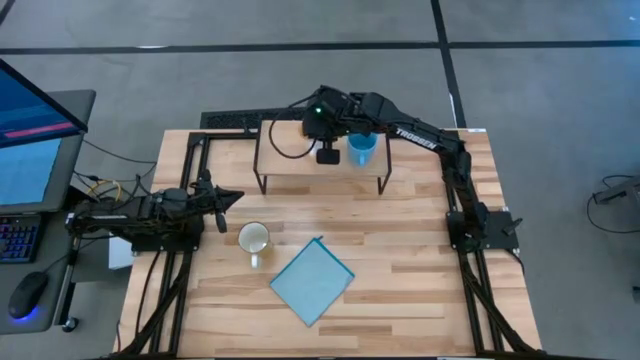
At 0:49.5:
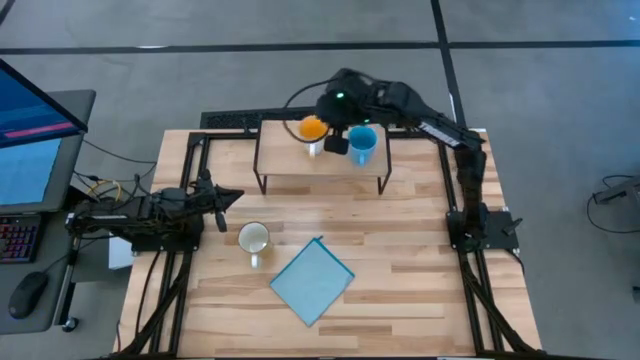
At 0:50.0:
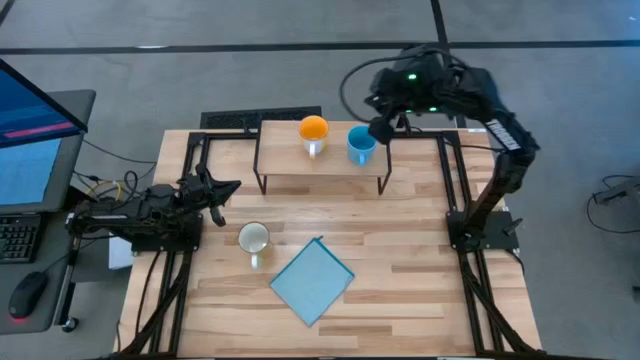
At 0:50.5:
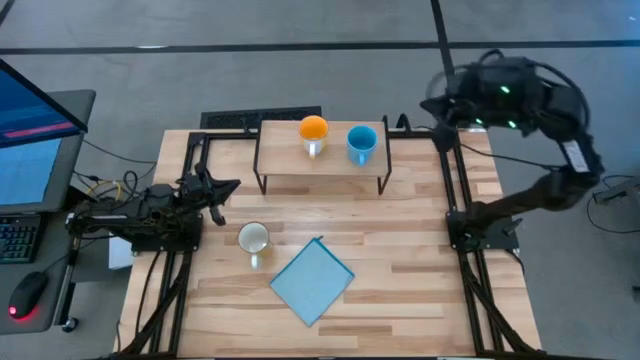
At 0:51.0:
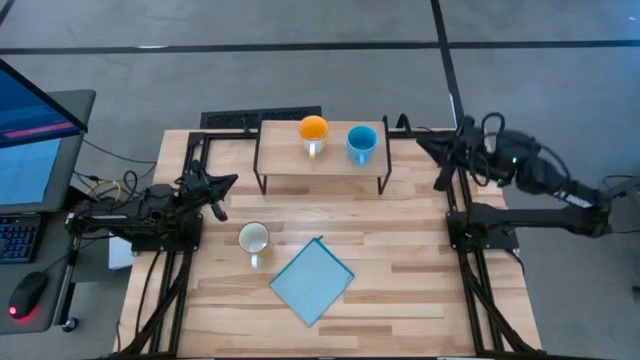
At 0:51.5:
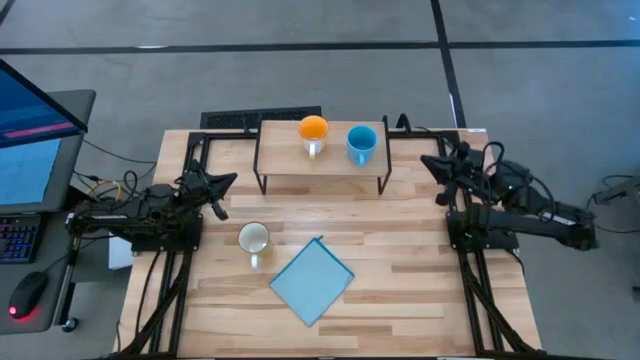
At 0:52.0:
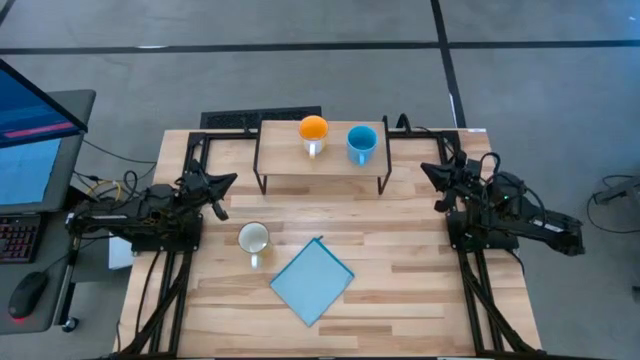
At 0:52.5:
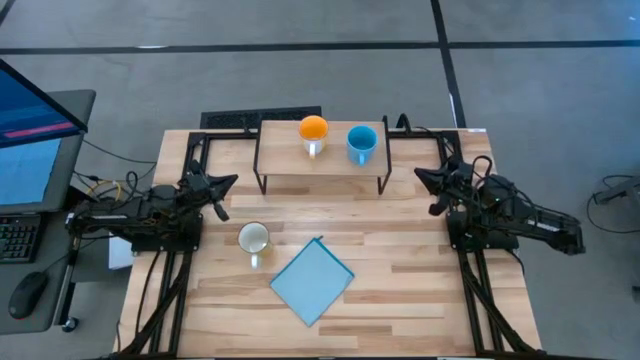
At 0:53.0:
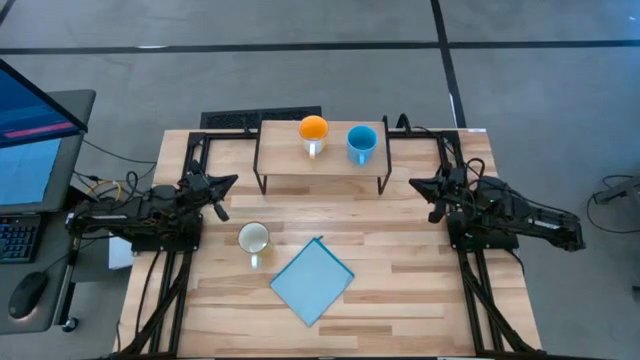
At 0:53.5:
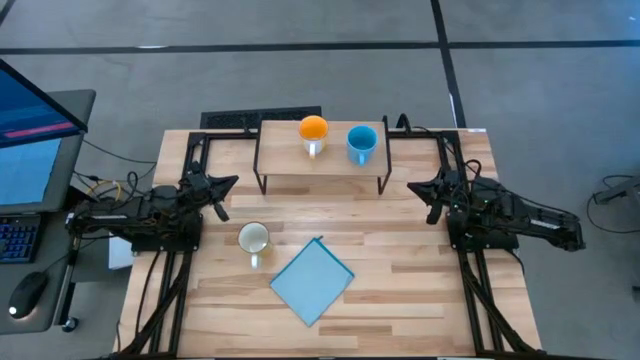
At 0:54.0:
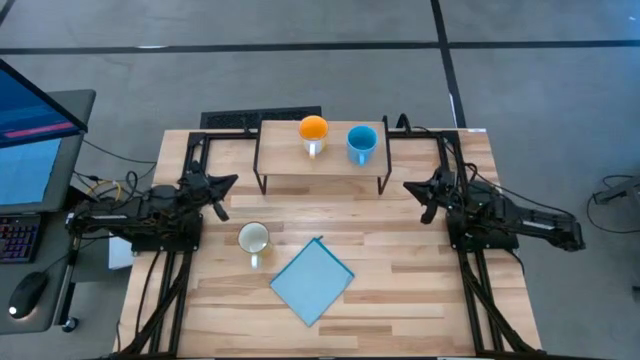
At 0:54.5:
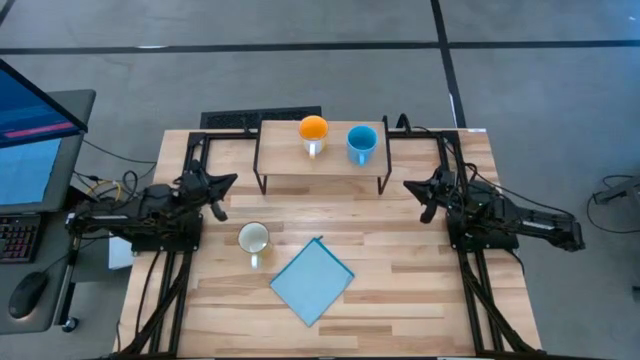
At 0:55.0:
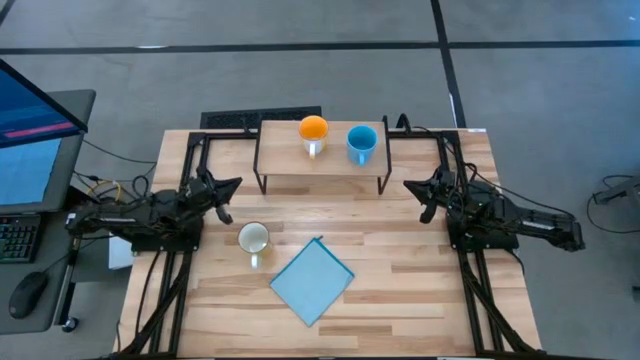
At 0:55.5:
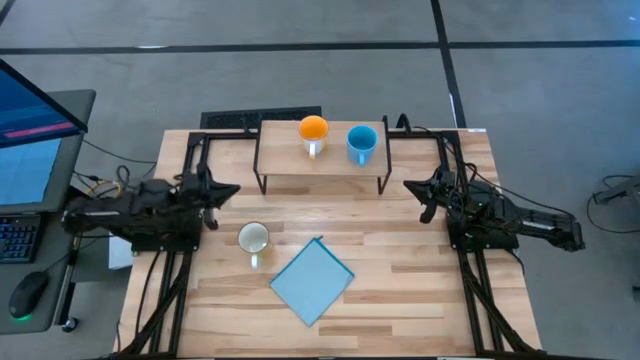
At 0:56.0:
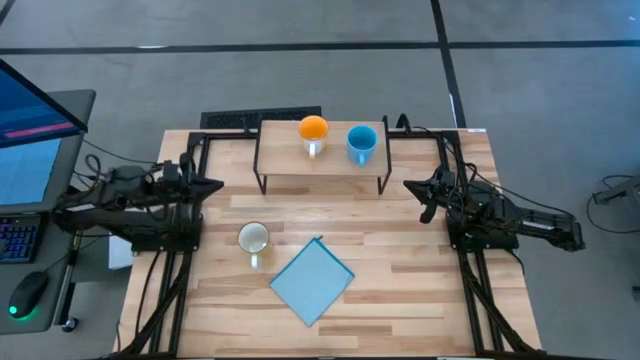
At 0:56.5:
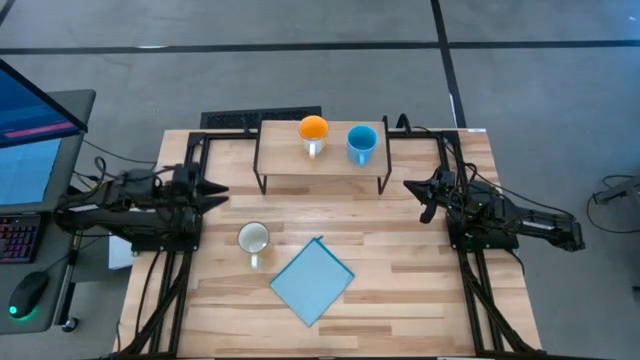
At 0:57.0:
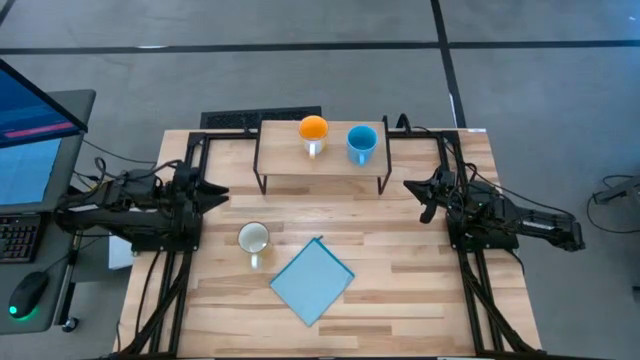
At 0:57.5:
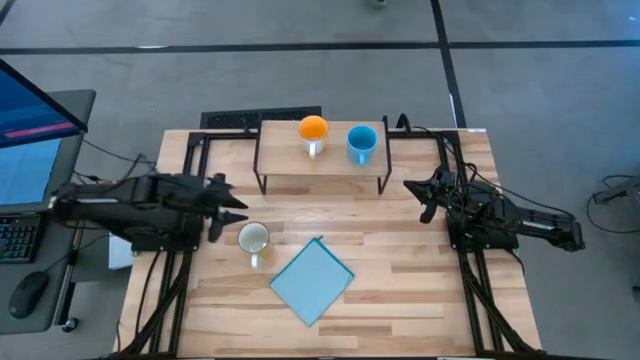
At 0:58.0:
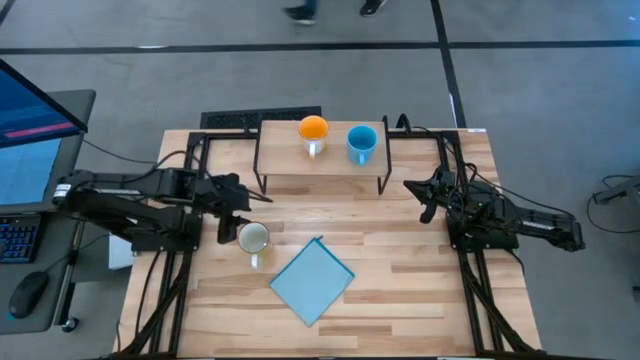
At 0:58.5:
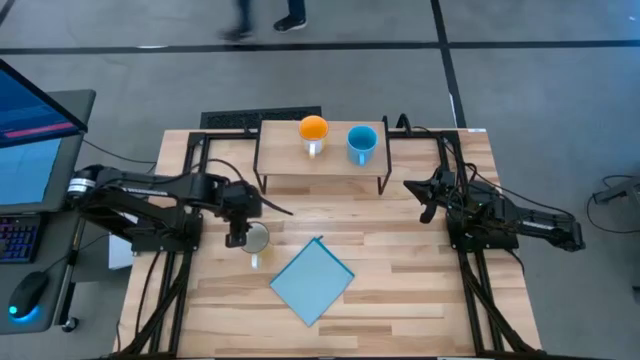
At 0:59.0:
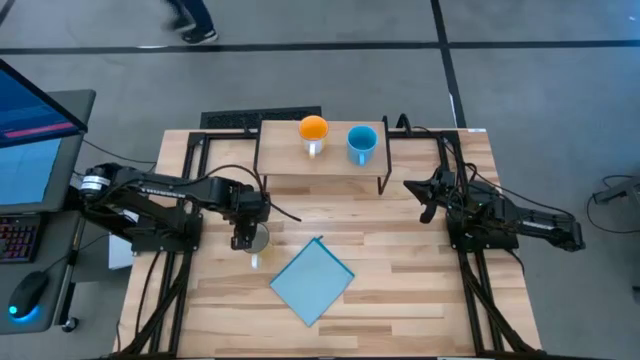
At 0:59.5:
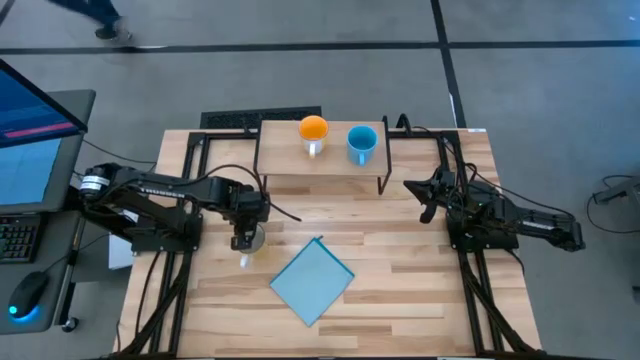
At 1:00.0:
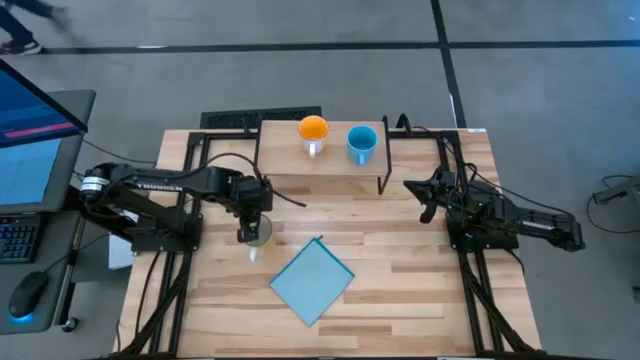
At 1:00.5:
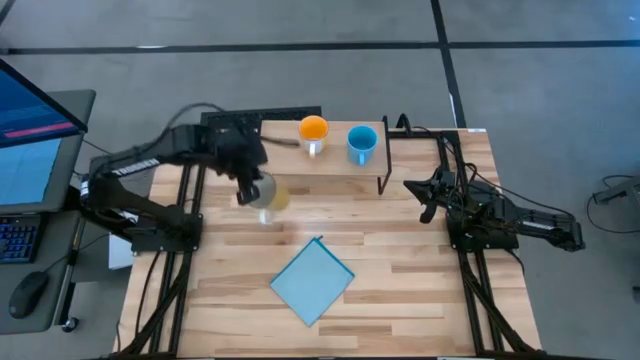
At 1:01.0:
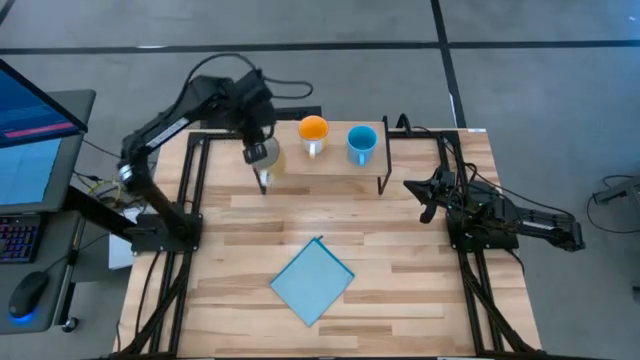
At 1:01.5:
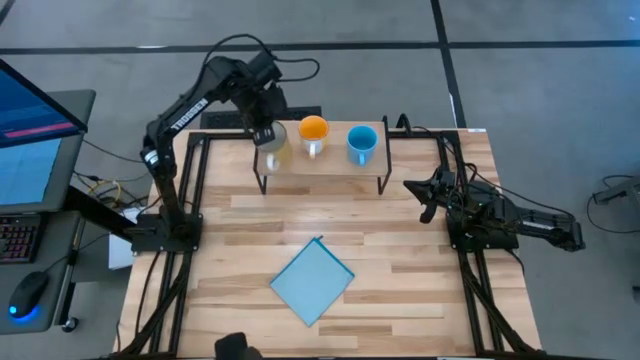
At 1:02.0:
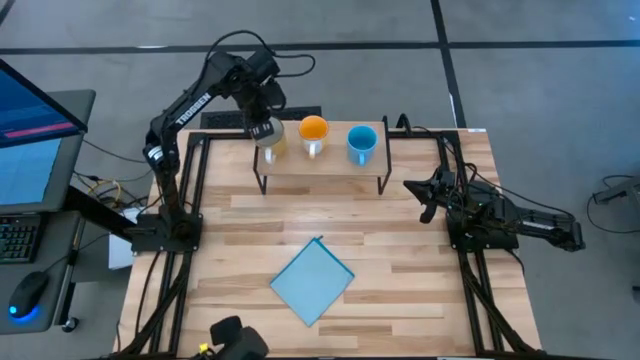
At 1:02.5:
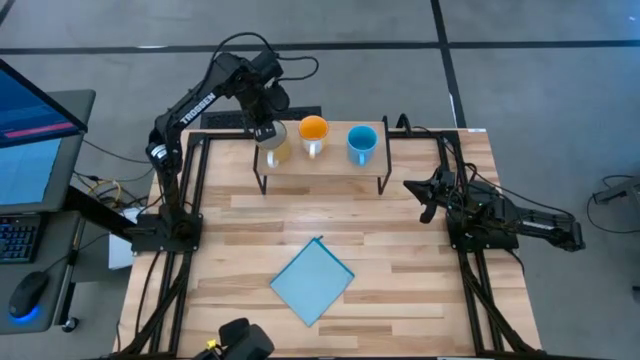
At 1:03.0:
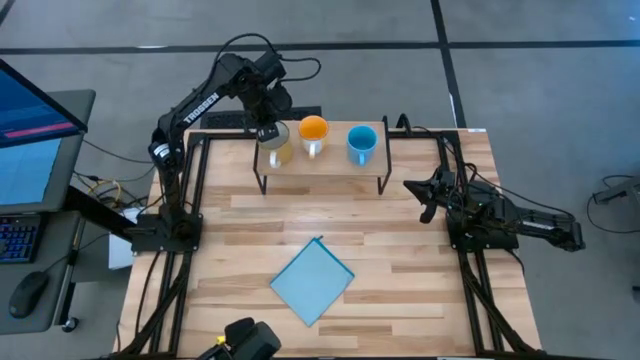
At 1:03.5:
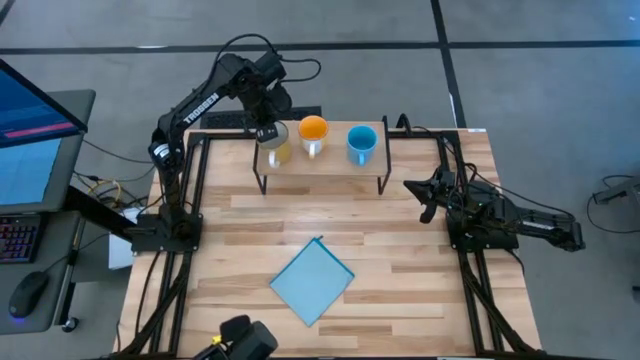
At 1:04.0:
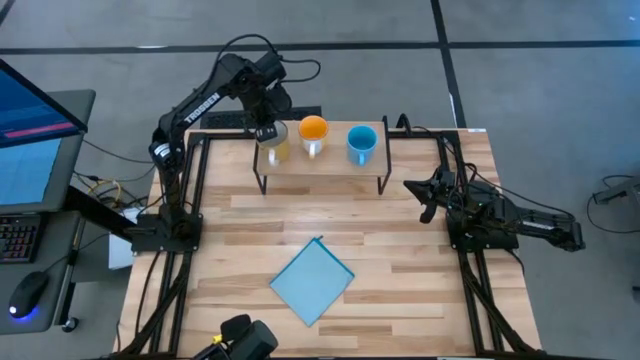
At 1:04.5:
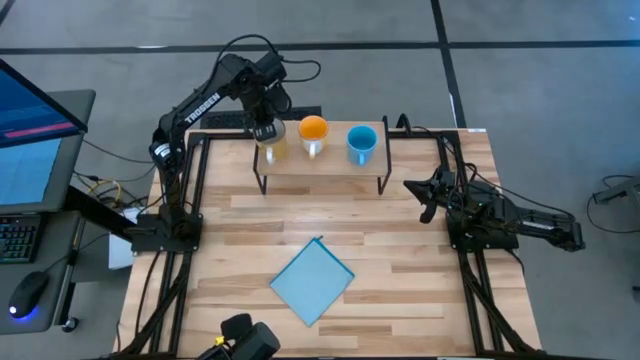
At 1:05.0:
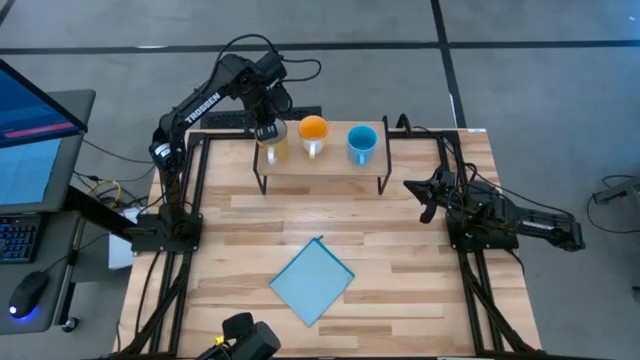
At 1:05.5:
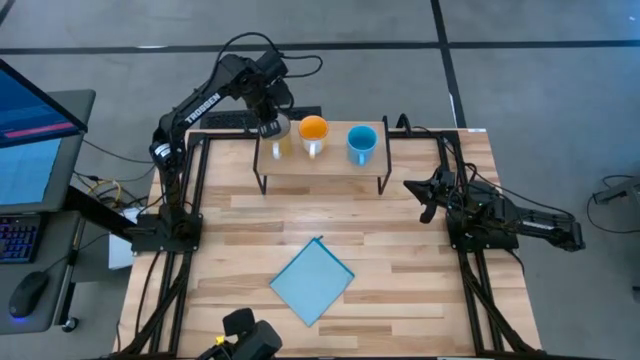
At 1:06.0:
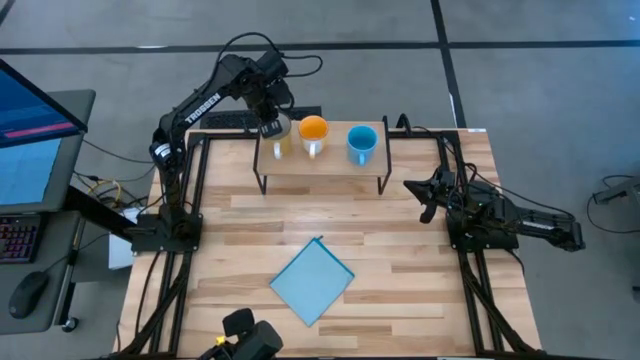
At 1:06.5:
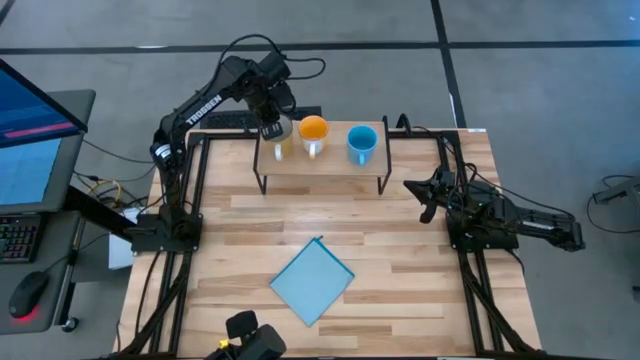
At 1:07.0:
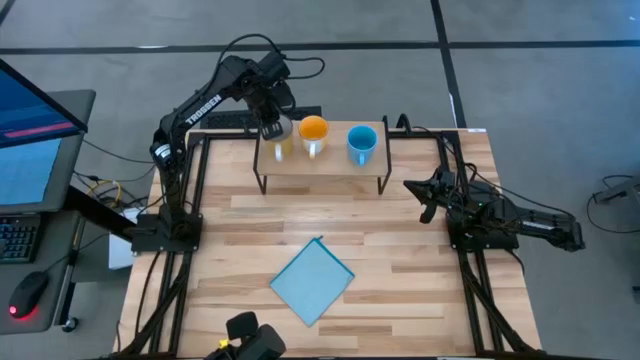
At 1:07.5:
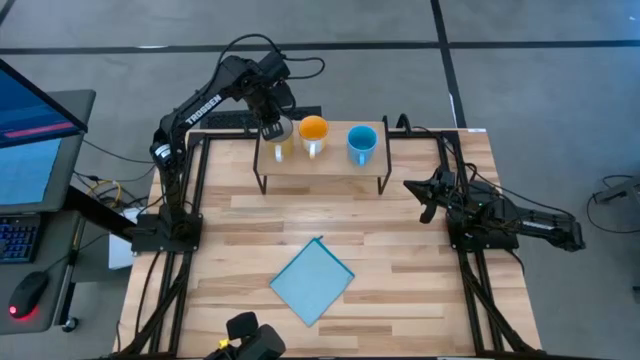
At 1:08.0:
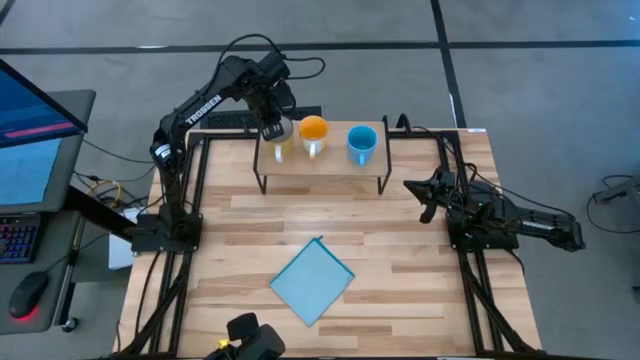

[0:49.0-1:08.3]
Task: Stack small to large cups/mugs on shelf
Put the light yellow mug on the shelf

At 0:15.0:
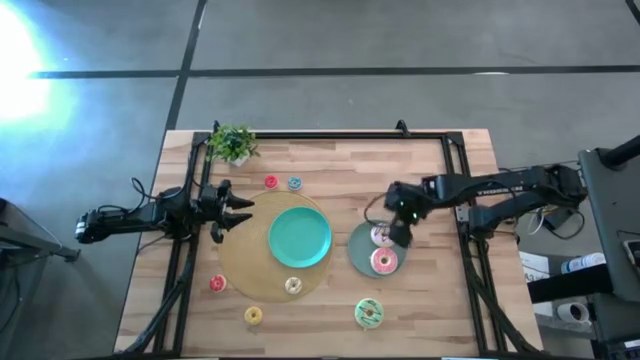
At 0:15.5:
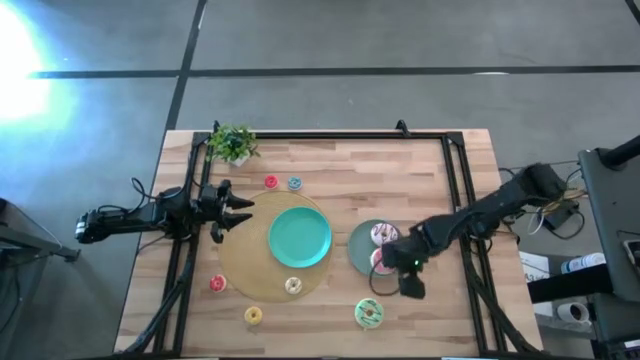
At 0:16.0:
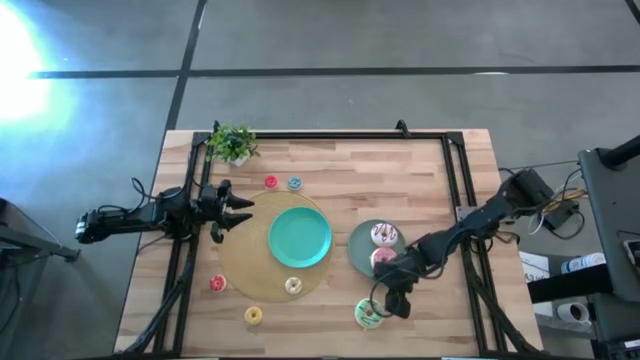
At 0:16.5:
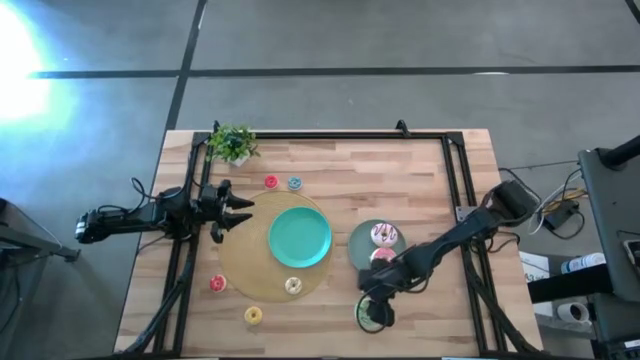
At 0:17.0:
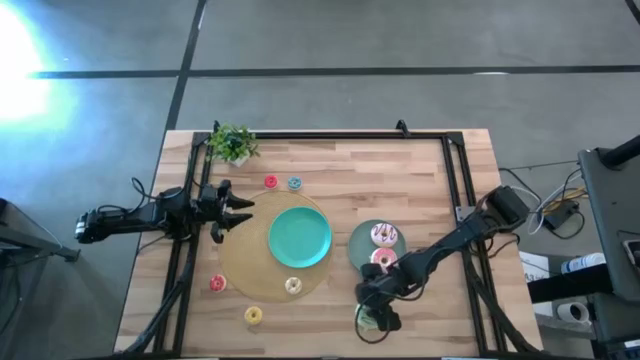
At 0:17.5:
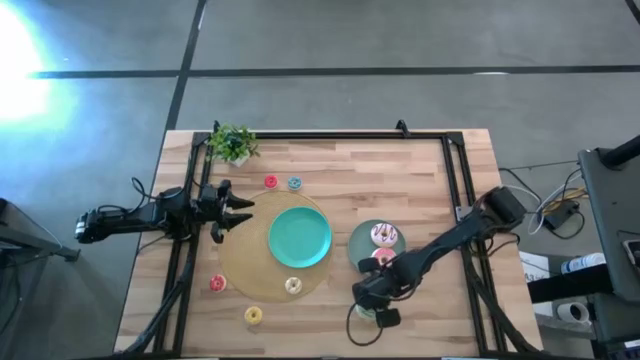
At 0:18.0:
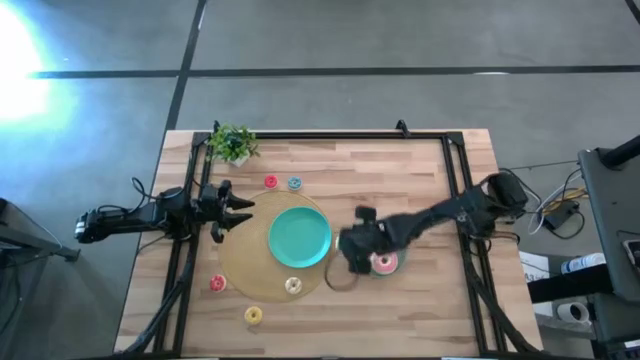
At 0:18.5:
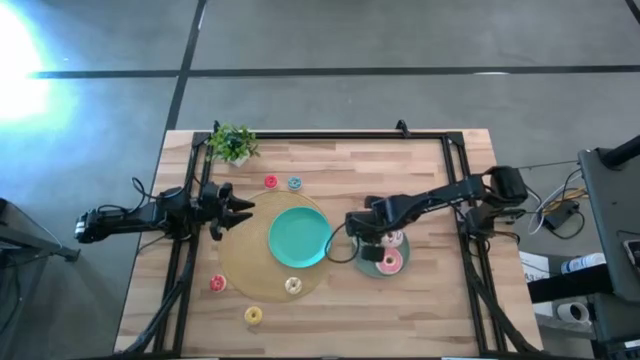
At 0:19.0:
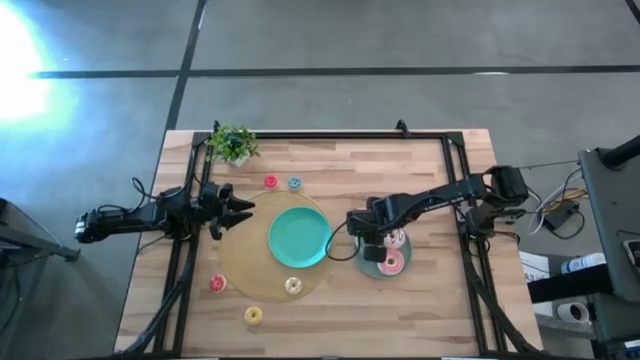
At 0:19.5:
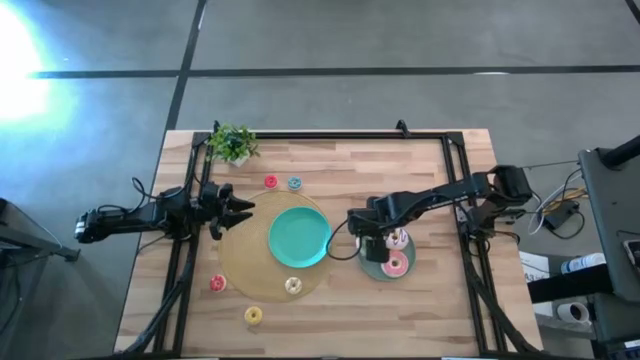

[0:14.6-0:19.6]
Task: Pick & Place donuts
Put the large green donut on the right plate
